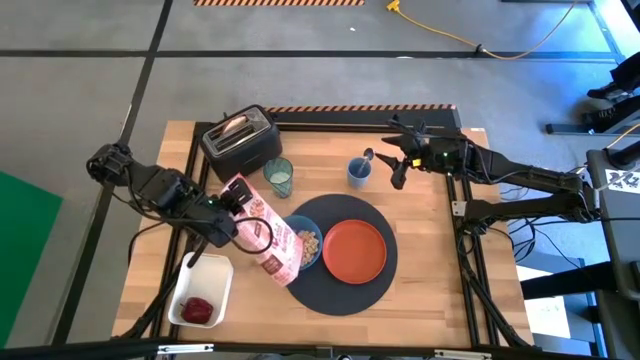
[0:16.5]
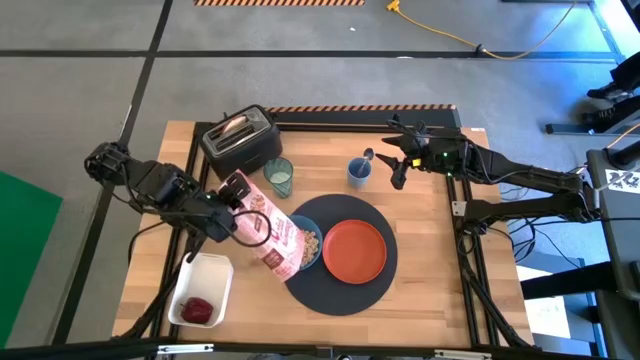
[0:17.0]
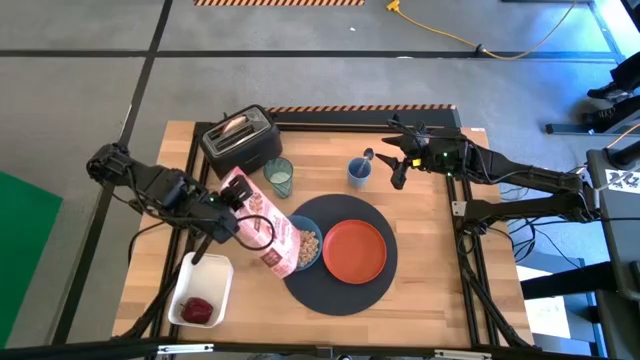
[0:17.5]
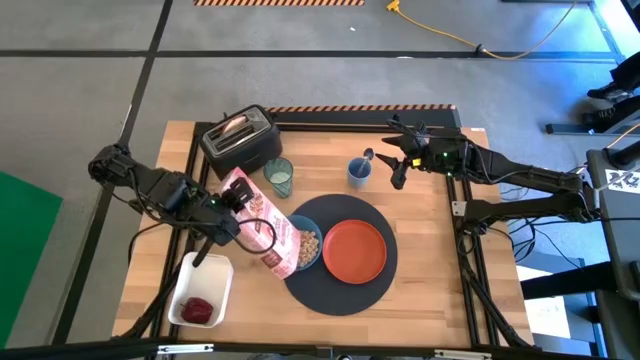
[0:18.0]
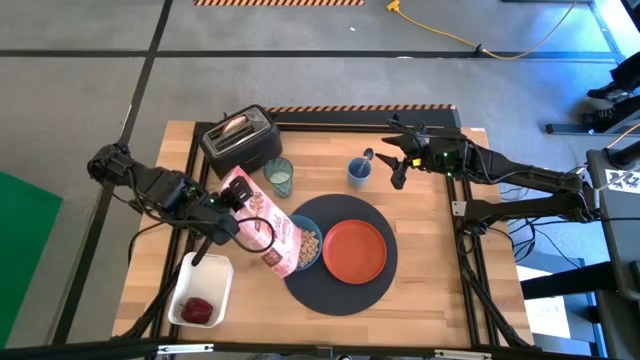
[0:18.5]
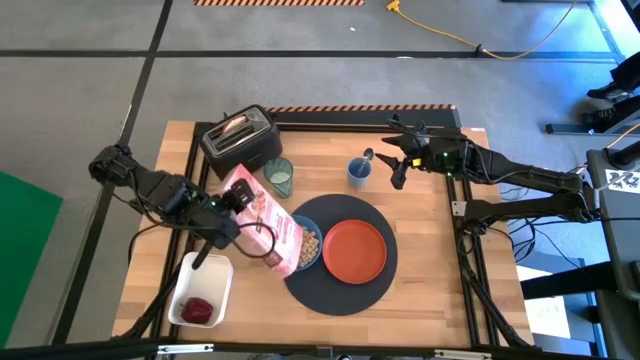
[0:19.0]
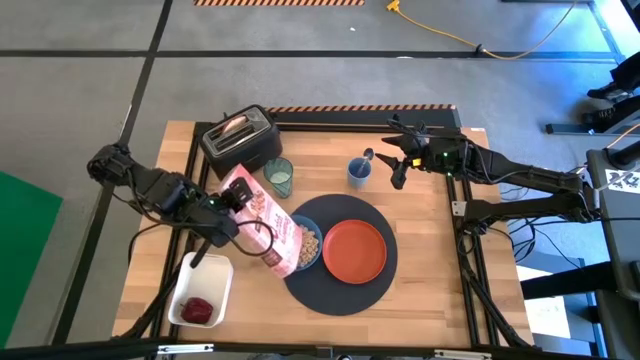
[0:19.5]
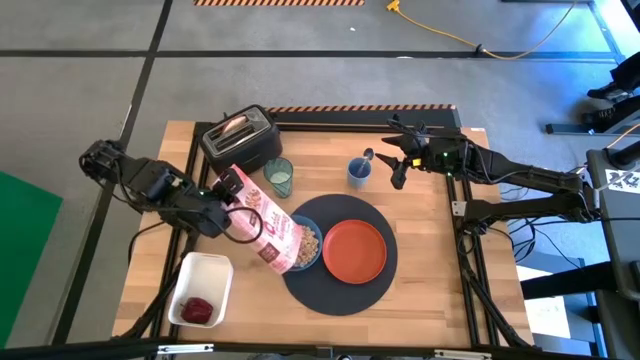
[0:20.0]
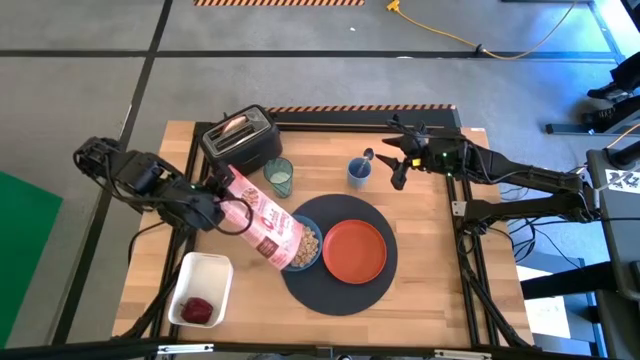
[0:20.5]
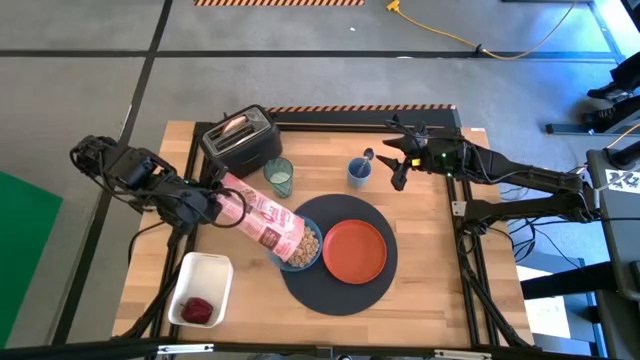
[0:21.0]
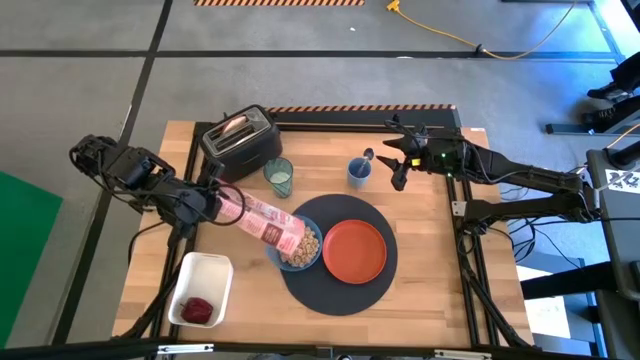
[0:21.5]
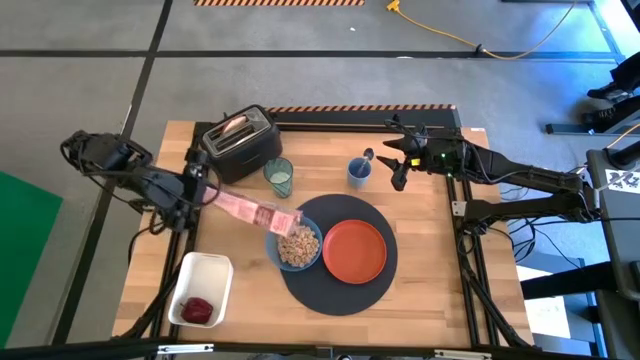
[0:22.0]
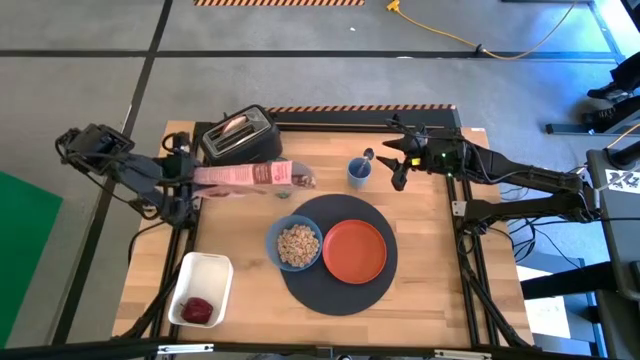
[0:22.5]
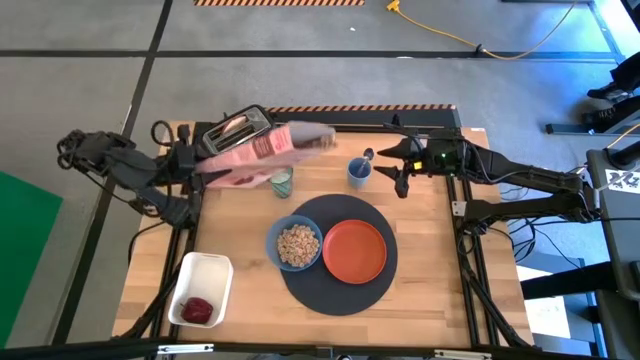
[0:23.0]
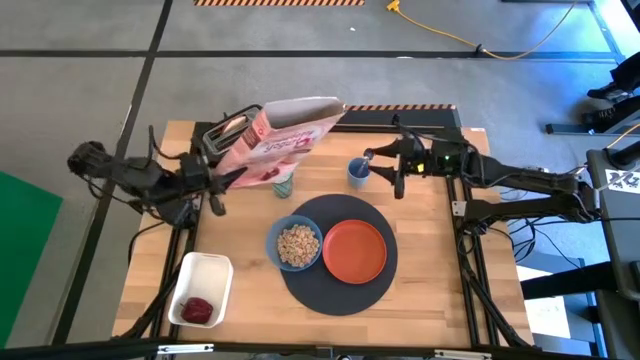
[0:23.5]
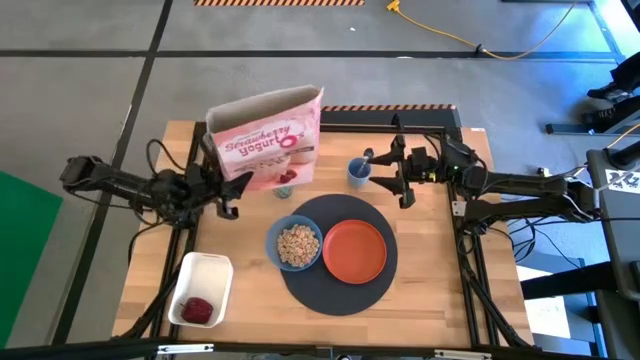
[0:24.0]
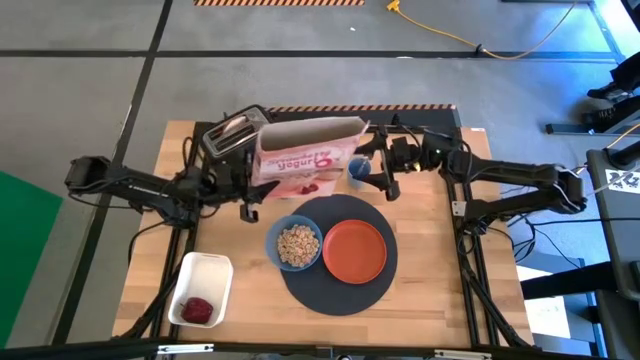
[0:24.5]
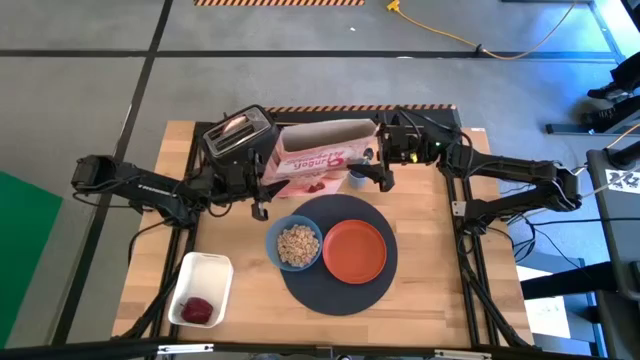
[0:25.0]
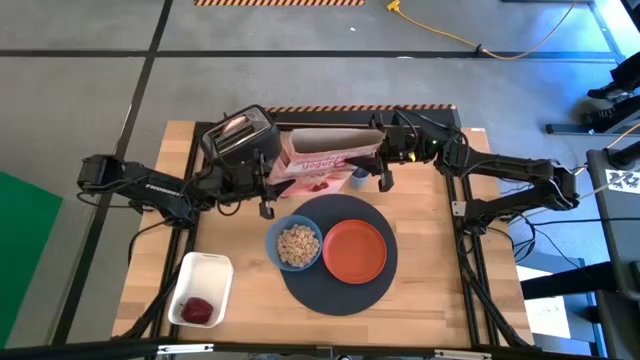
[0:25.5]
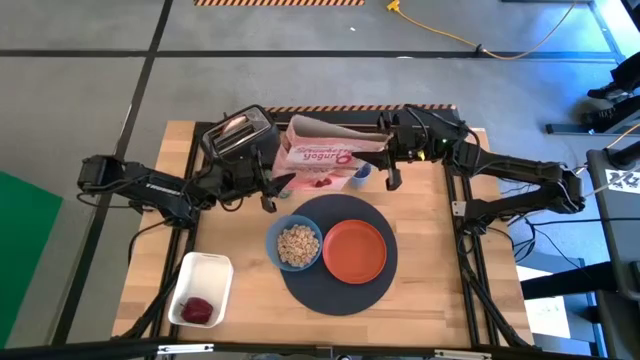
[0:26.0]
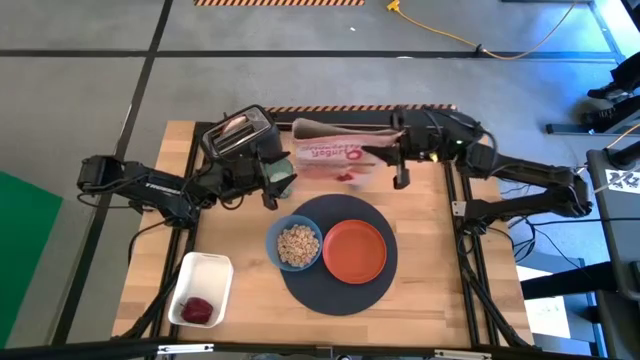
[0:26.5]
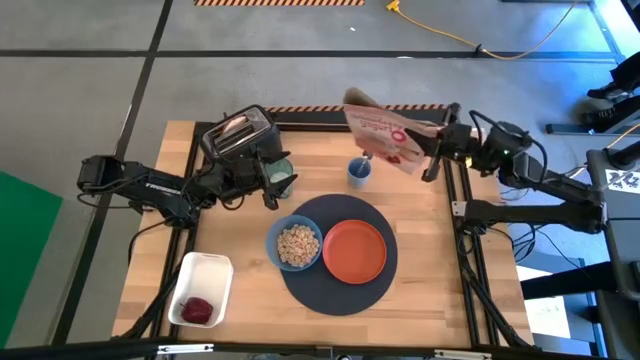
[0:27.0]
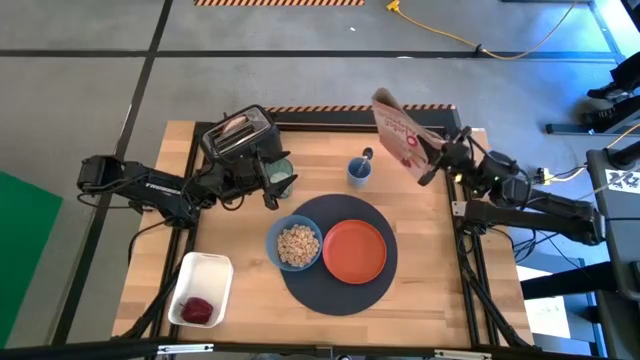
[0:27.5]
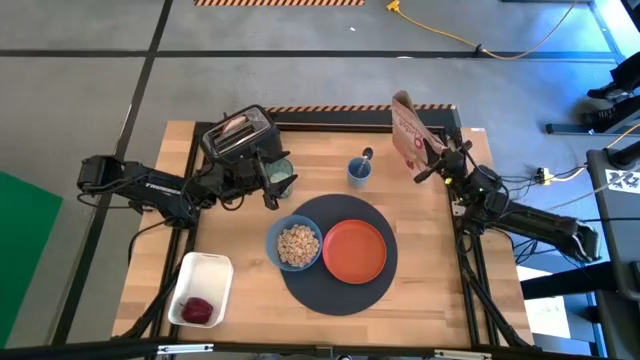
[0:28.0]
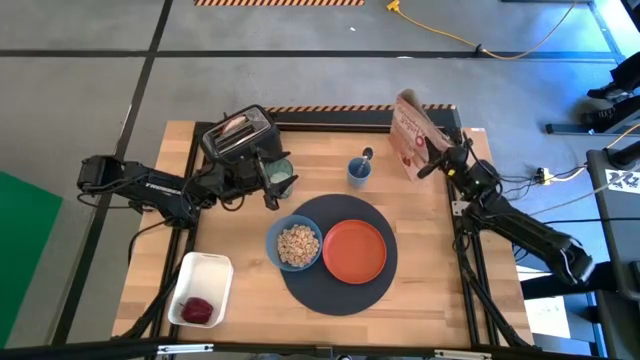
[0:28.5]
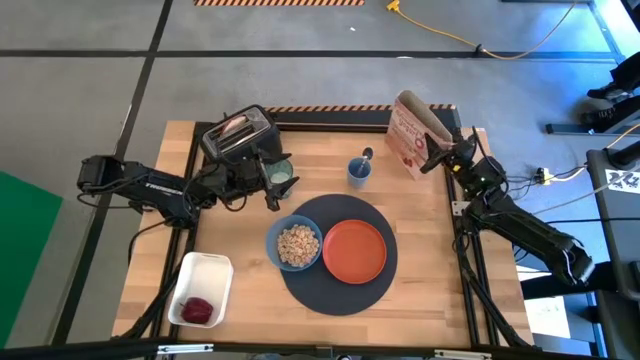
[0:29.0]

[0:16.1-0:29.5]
Task: Arrange a breakfast setting
Pour cereals from the pink cereal box into the blue bowl

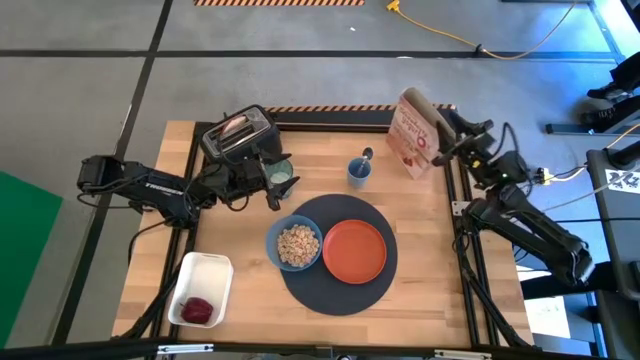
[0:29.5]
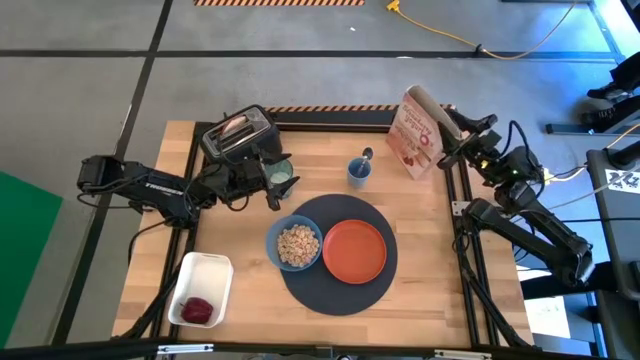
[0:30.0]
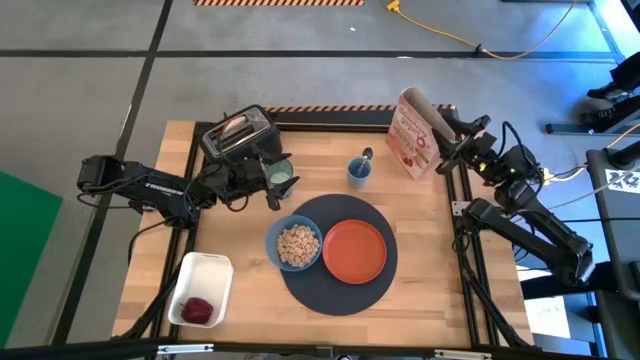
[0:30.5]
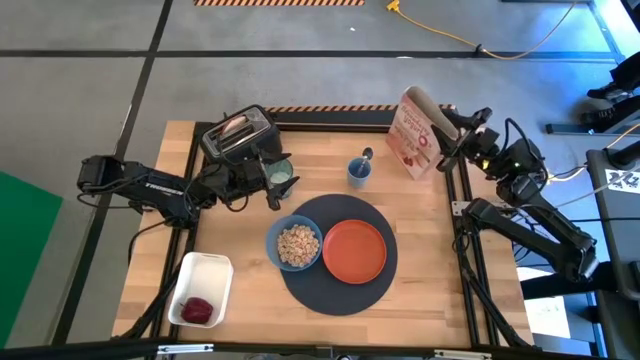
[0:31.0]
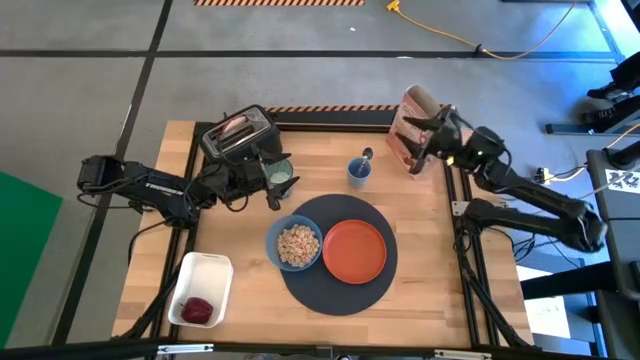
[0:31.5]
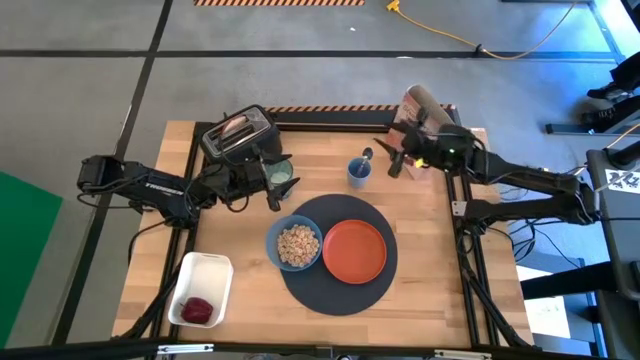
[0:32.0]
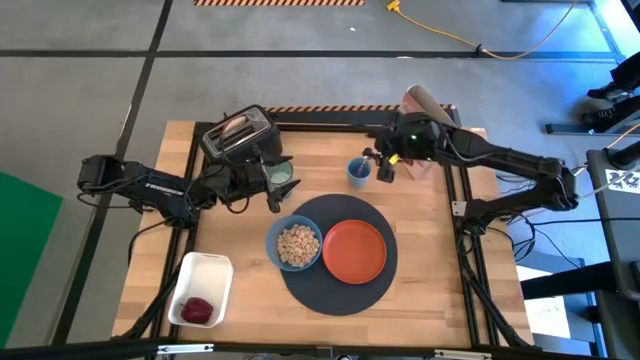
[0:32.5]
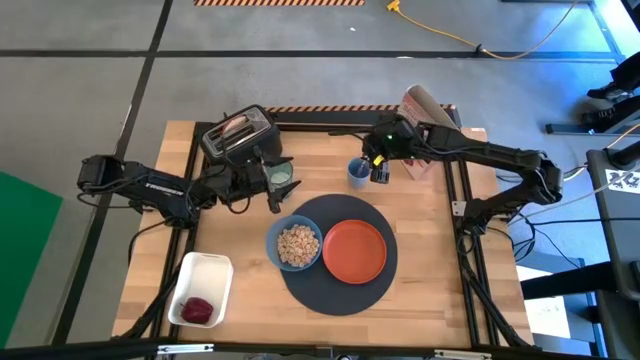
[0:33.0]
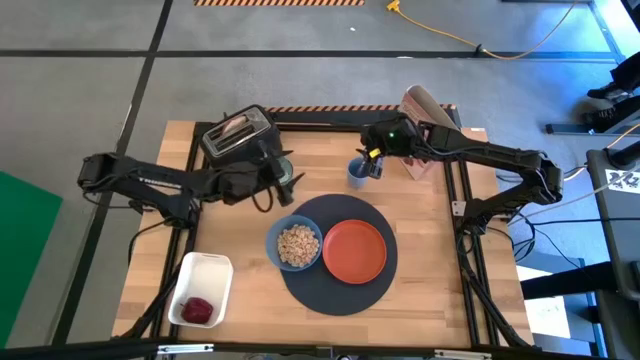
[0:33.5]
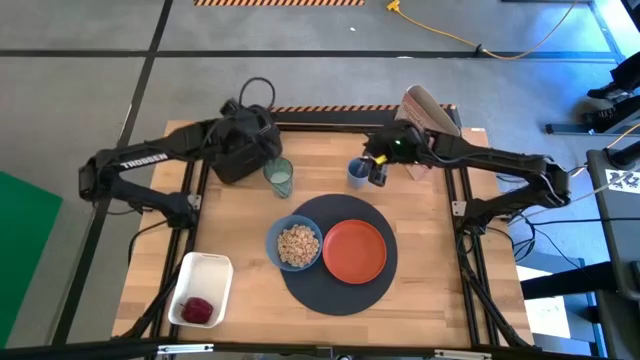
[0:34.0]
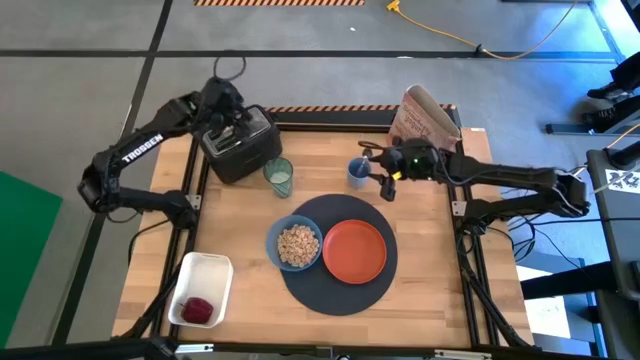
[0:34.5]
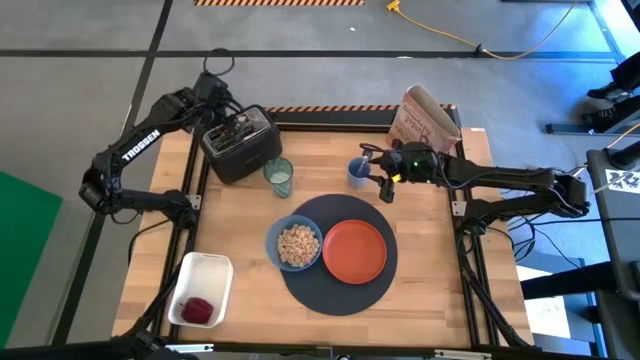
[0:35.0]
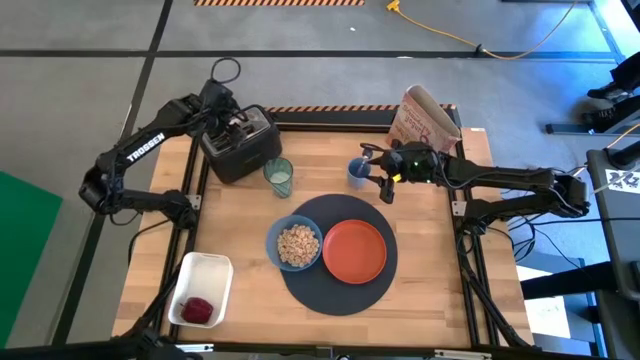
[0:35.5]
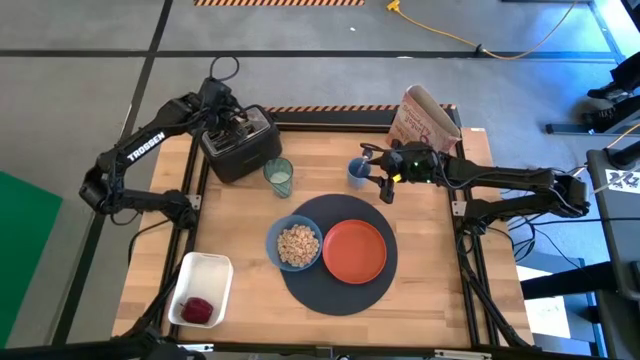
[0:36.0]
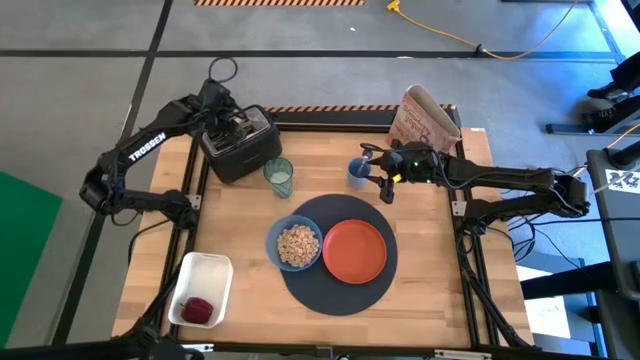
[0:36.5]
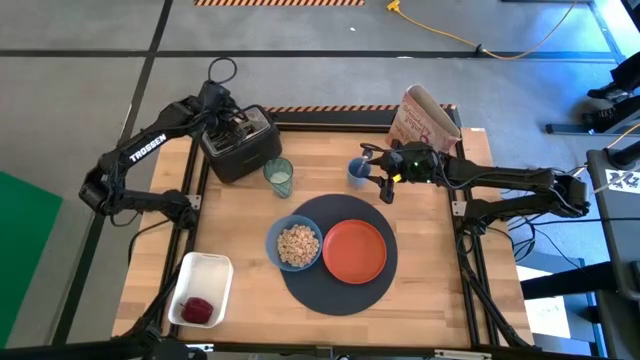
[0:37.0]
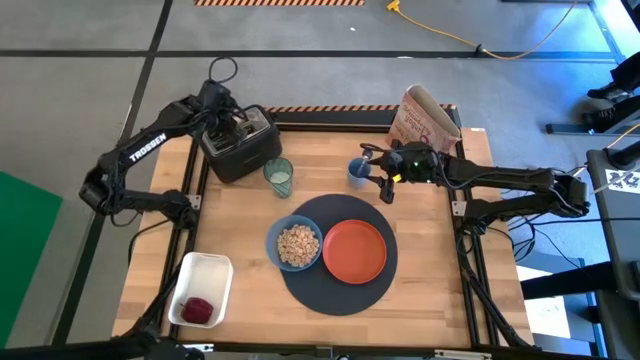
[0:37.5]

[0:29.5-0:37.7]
Put the toasted bagel on the orange plate
